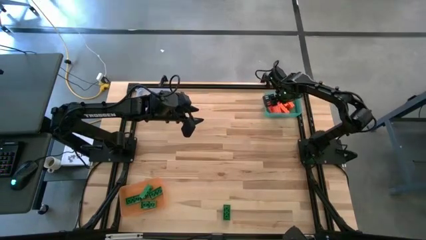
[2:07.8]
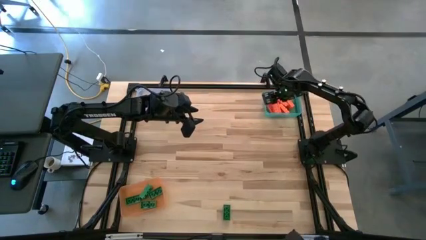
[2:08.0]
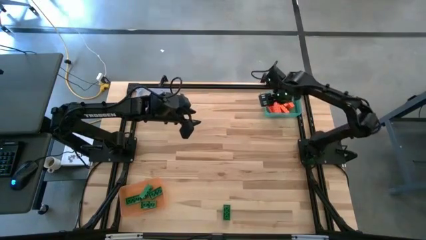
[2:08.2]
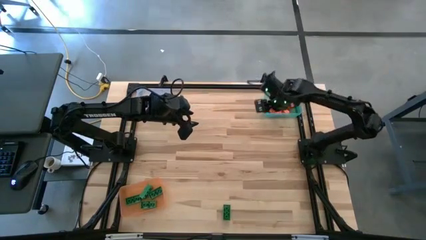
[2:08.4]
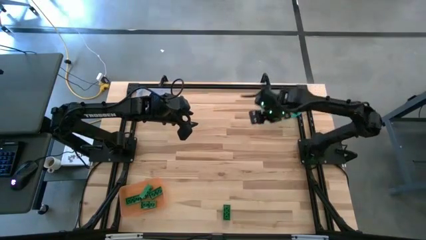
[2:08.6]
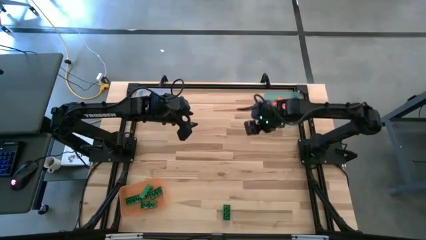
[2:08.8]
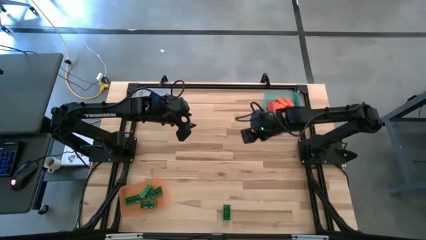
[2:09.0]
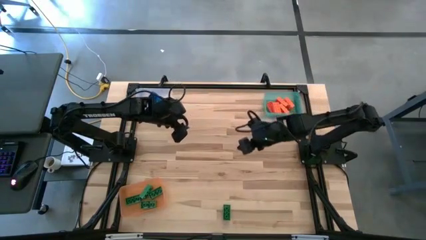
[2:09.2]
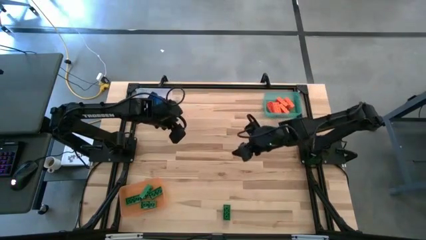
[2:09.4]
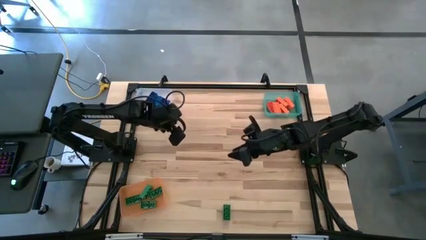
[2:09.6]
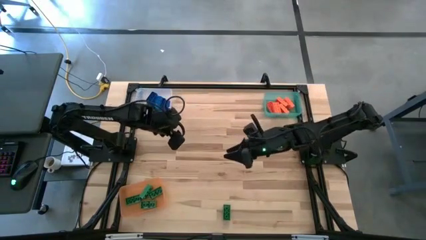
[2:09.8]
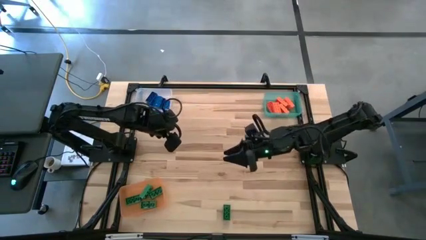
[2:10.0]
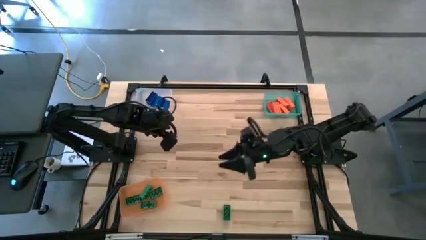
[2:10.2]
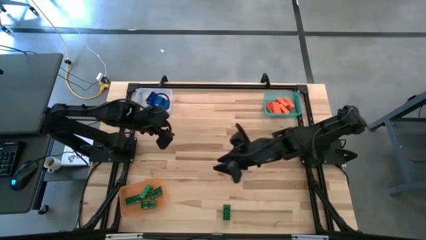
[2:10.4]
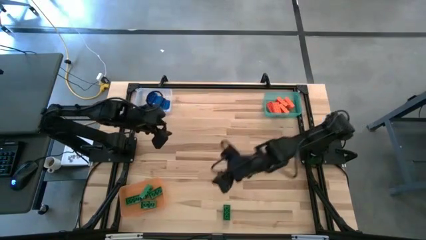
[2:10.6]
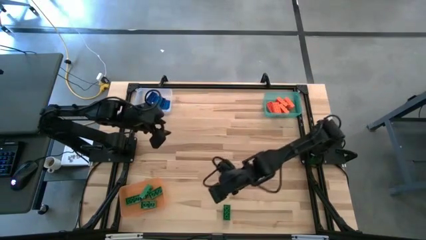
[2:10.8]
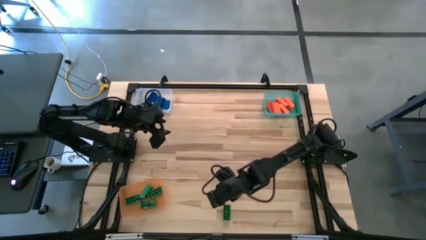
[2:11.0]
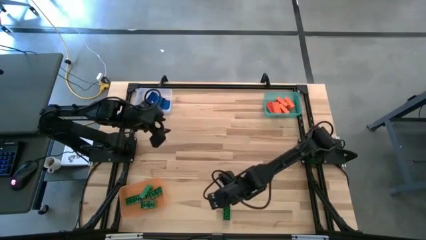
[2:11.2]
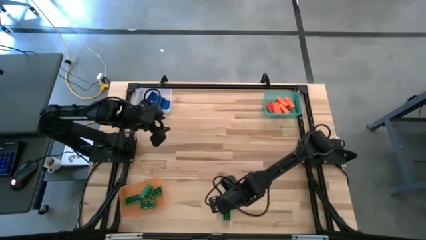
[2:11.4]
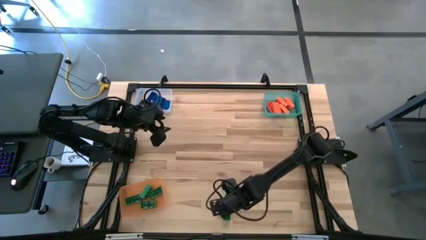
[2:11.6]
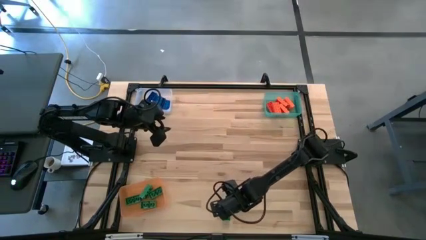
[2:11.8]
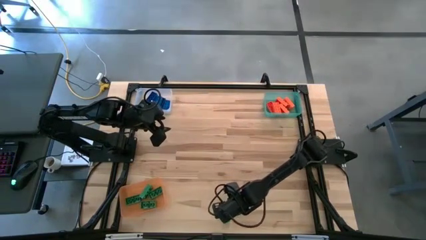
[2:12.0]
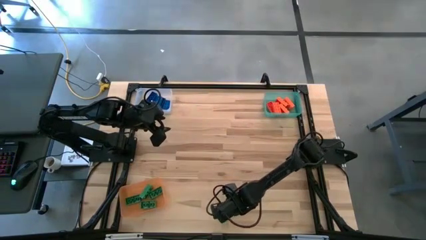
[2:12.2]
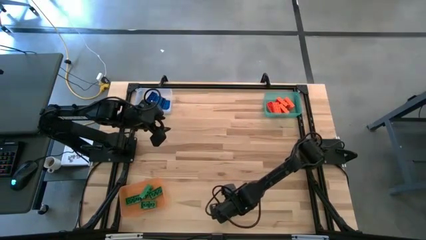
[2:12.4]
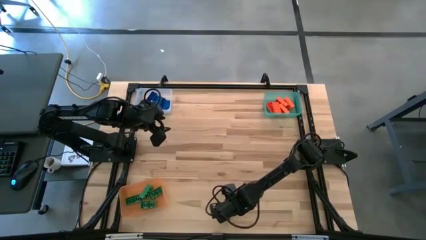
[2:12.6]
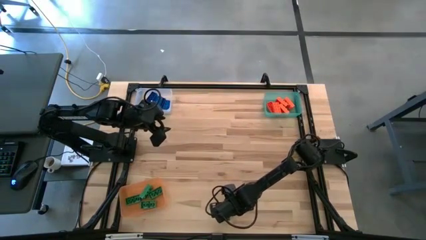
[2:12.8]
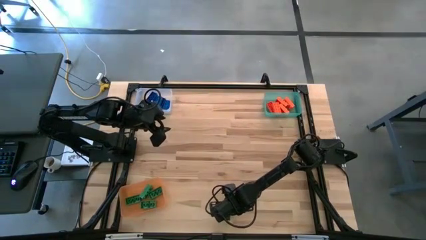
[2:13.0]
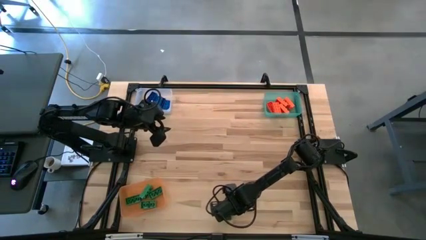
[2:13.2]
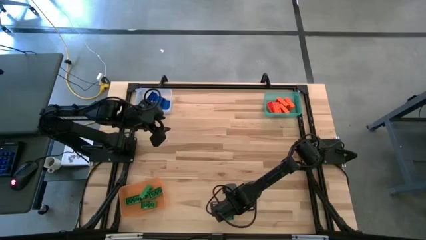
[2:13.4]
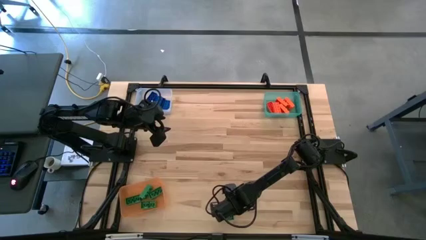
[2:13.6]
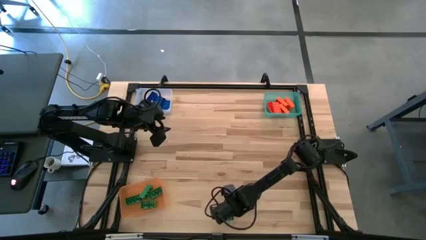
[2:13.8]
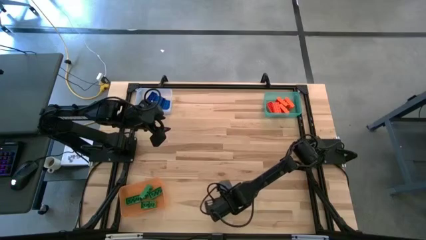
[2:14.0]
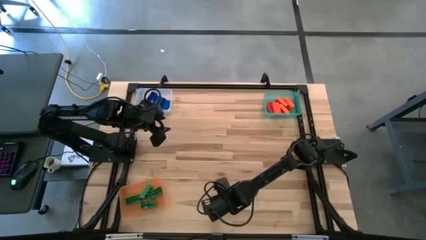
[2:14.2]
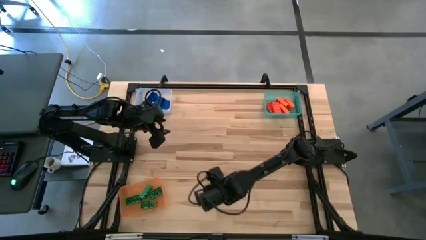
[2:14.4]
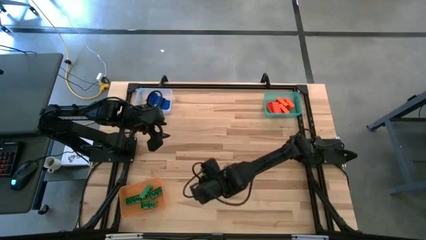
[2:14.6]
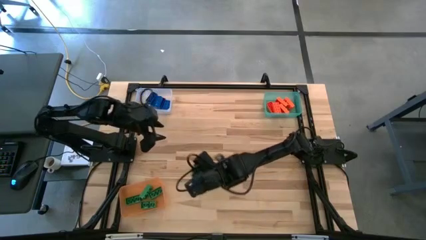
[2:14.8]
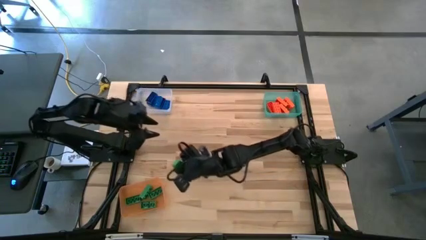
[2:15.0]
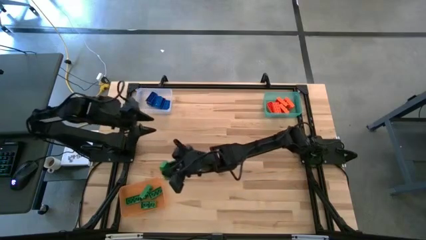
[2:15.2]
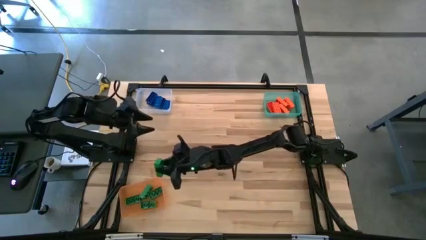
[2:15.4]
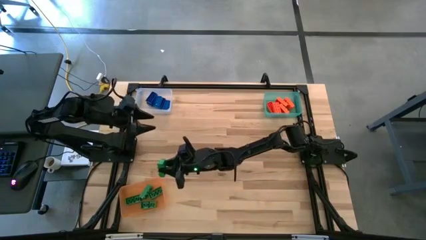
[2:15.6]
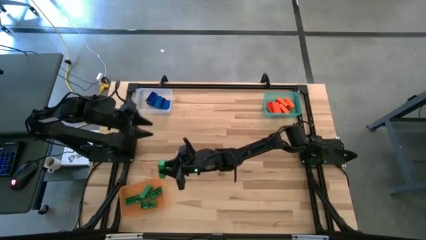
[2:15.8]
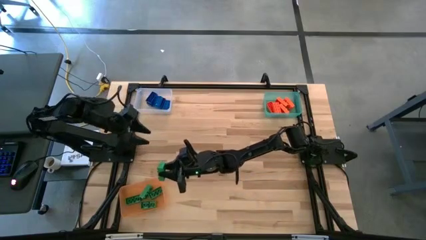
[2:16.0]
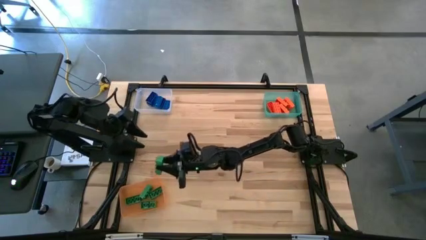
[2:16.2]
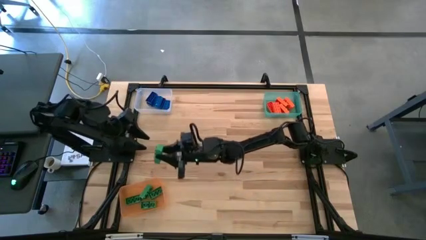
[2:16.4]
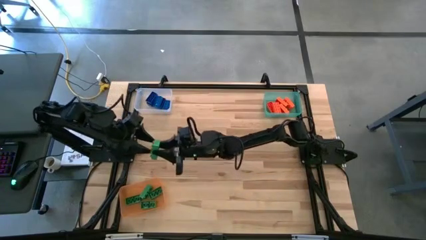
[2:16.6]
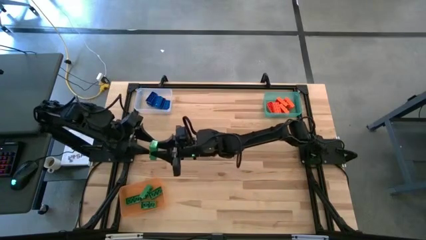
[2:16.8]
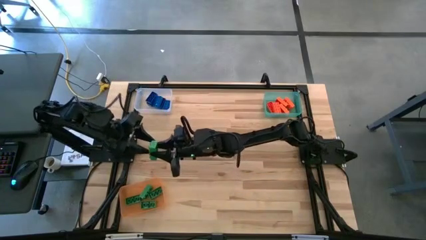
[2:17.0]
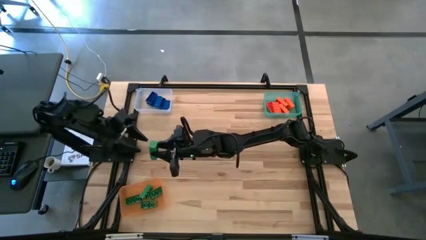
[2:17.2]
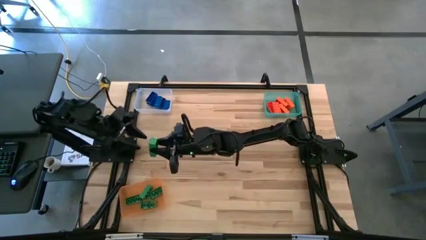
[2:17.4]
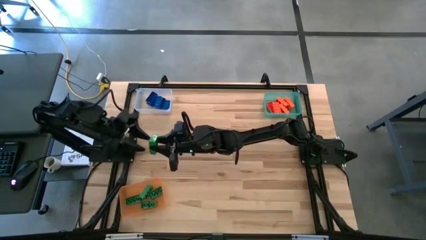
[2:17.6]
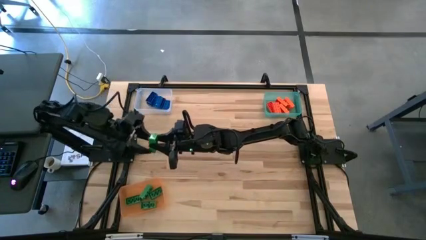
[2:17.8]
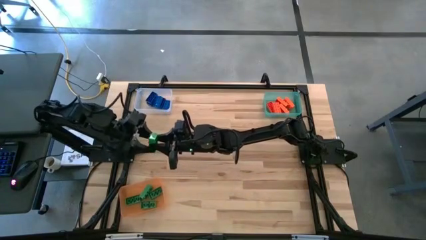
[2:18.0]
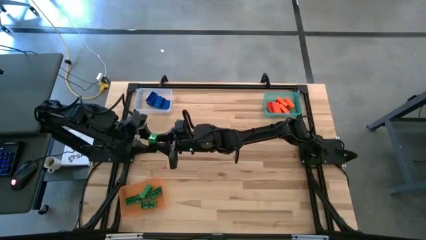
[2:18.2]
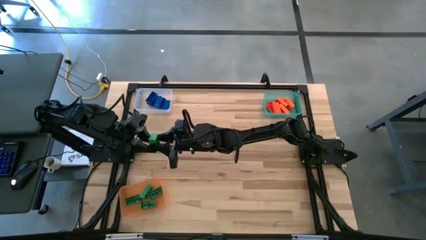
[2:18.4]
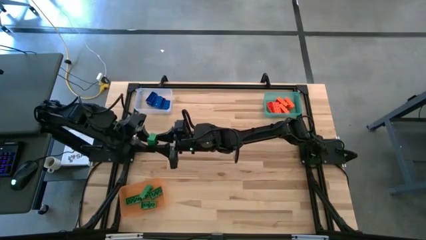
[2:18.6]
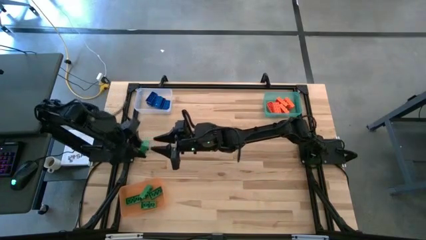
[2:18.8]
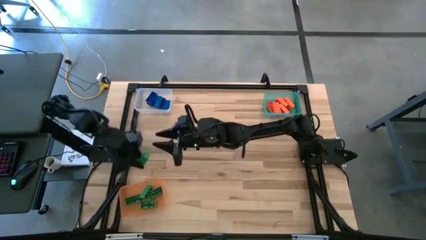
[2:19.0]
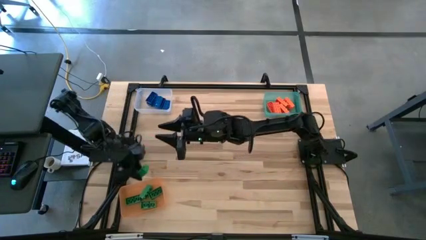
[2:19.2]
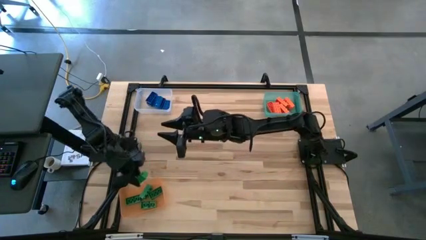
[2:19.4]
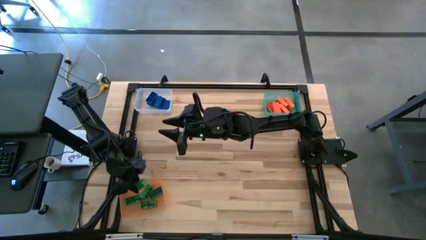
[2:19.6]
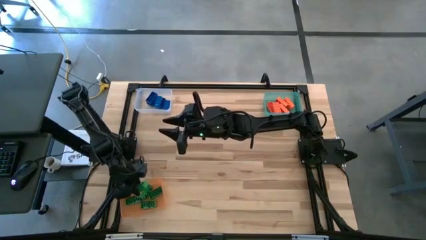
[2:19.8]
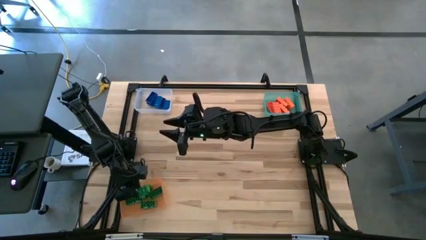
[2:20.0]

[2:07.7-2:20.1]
Task: Sort & place blocks by color
Put the green game piece into the orange bin

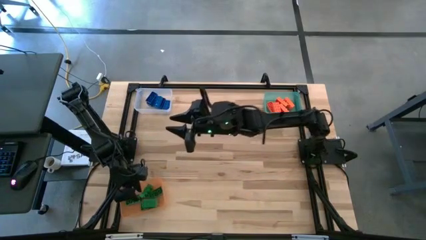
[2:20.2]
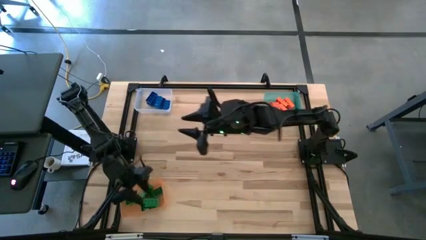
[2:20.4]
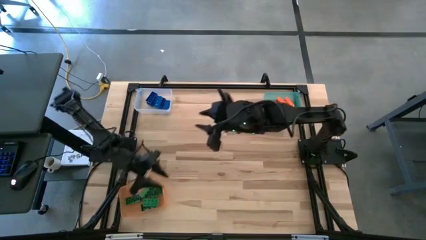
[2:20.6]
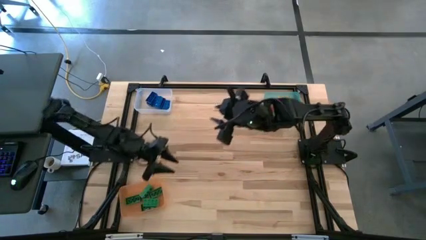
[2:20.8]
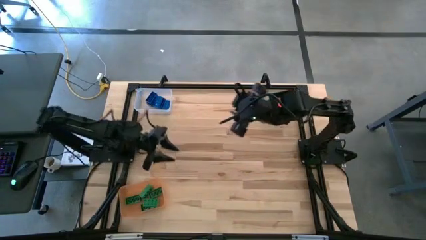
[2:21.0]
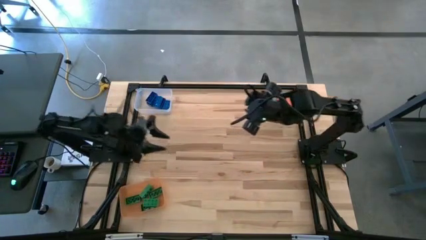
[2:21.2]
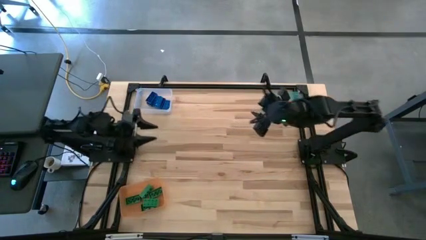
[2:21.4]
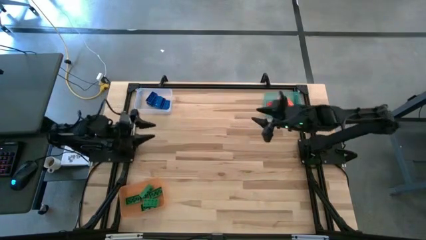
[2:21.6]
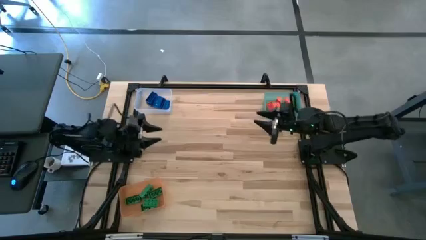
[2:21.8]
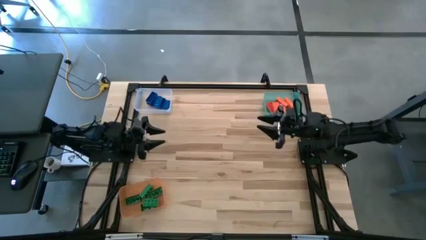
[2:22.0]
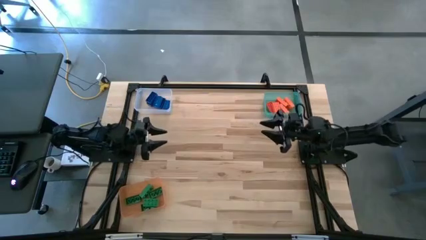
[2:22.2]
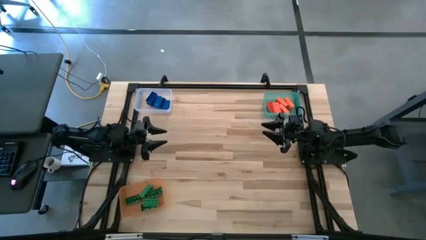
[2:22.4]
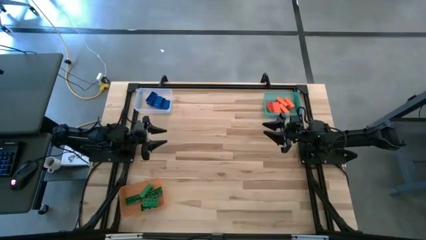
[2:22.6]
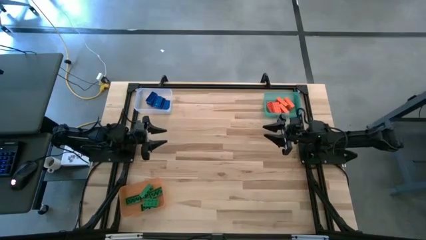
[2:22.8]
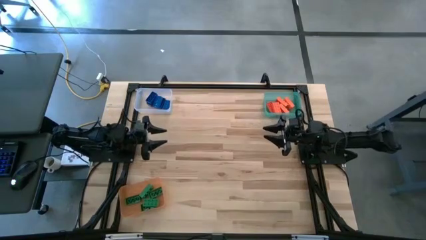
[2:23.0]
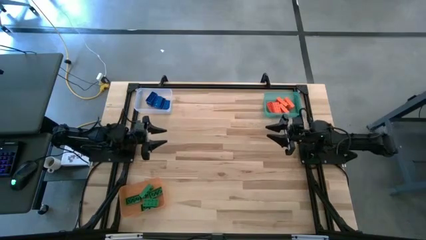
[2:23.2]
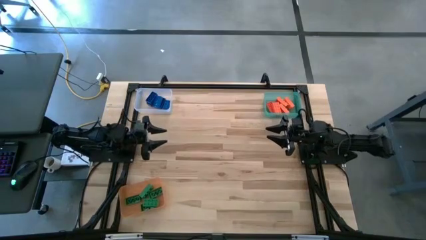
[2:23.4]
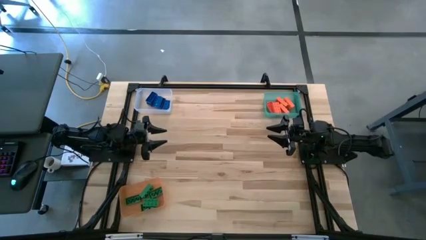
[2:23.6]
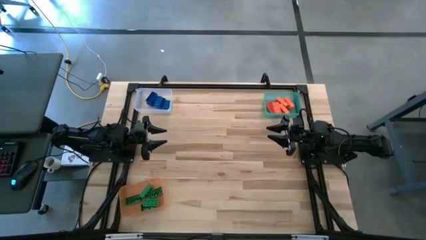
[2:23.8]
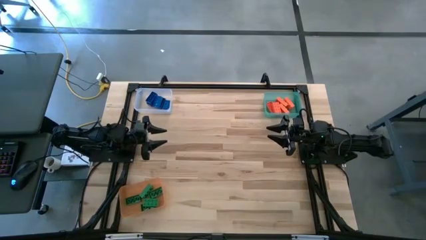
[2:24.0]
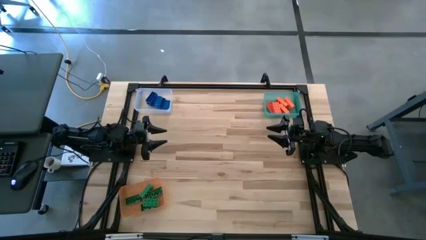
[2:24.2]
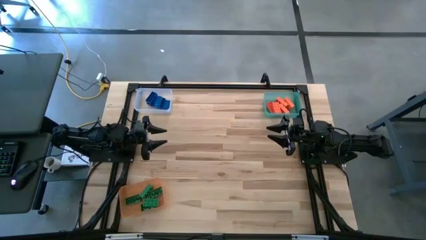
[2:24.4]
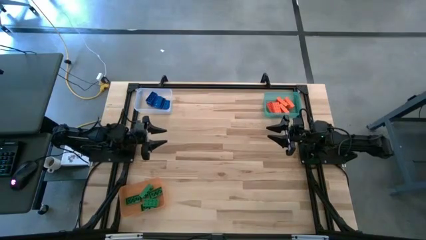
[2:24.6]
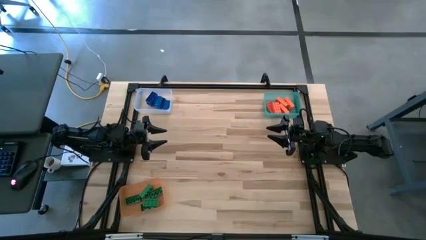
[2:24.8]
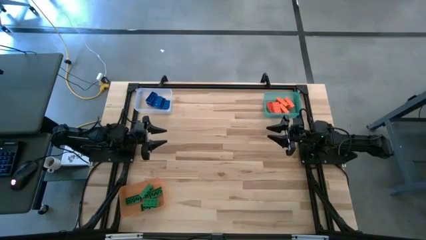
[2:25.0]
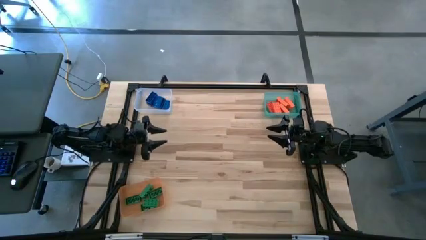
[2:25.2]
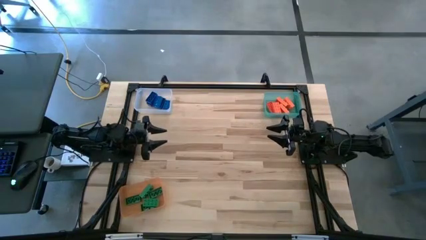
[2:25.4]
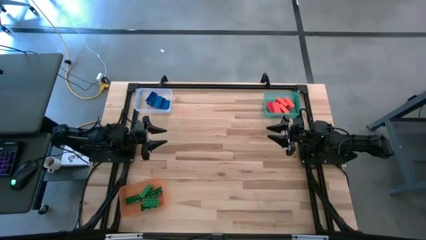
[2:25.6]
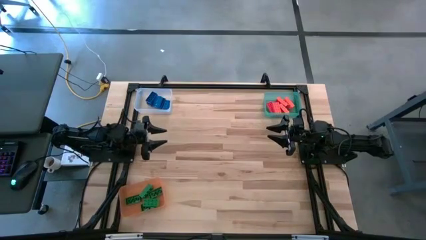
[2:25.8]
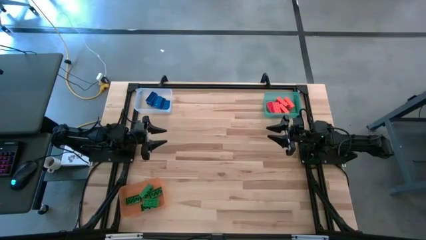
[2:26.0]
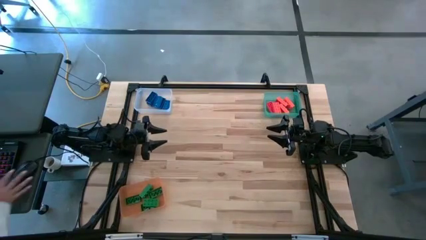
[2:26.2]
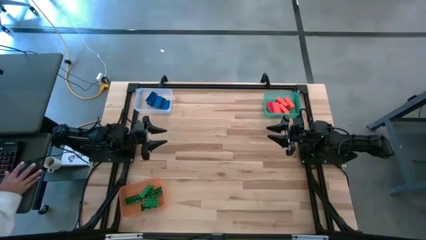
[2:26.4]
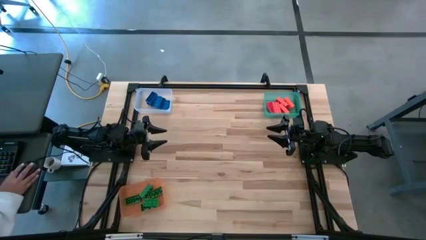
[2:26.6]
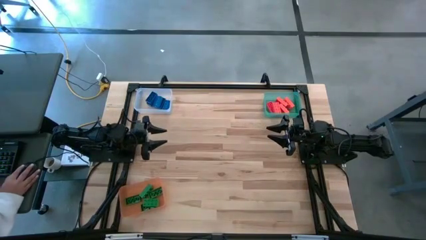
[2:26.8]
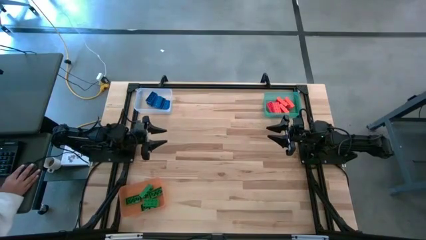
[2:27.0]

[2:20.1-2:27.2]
Return to Home Position
